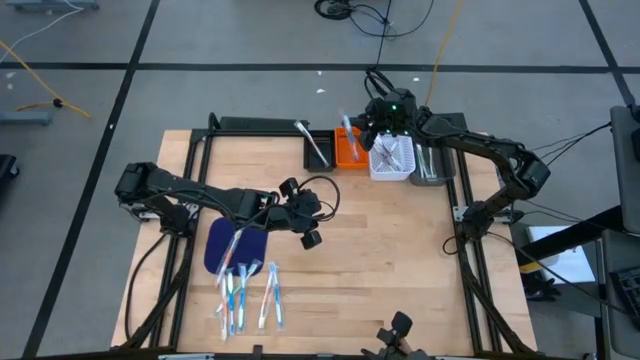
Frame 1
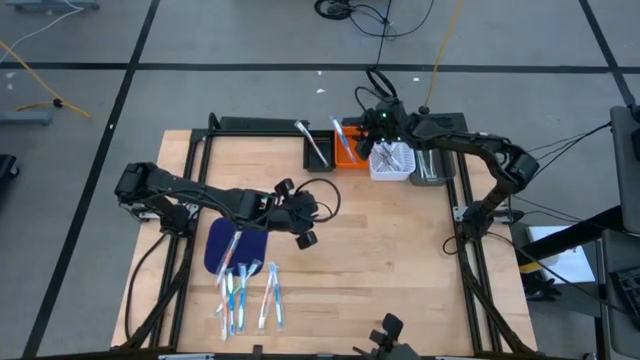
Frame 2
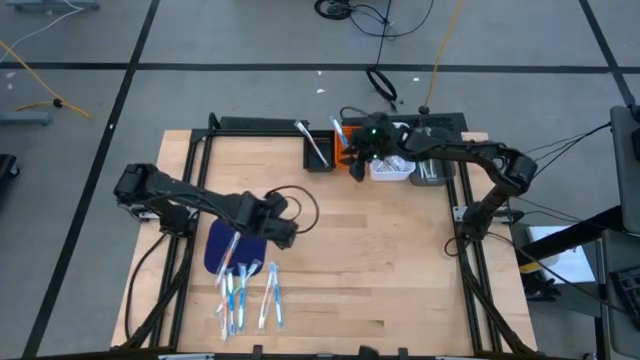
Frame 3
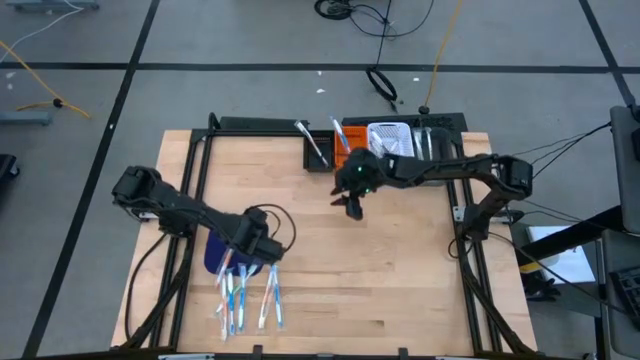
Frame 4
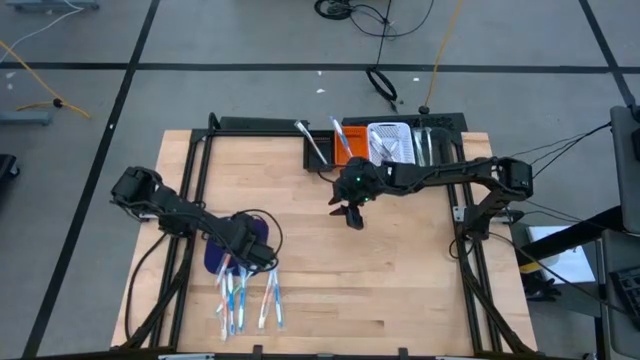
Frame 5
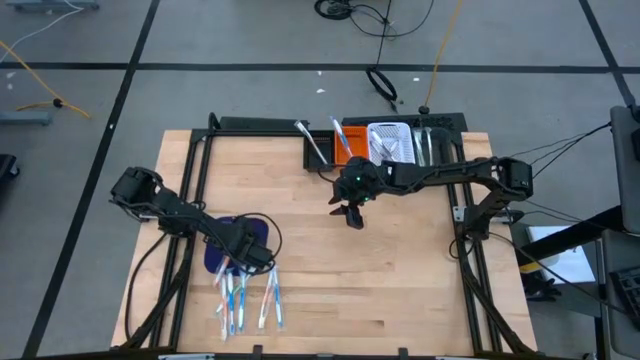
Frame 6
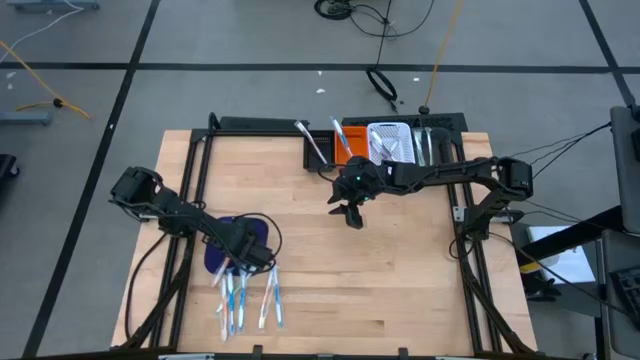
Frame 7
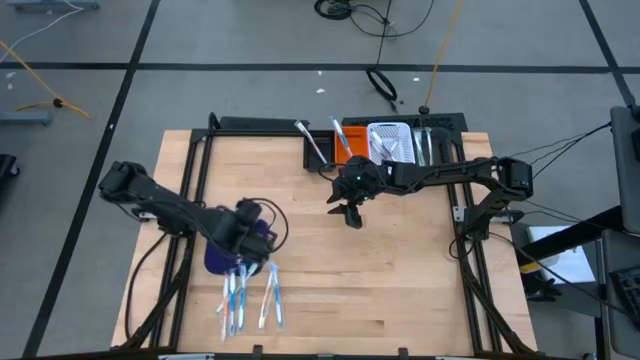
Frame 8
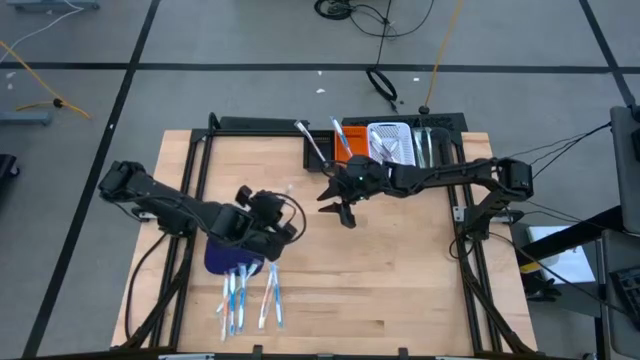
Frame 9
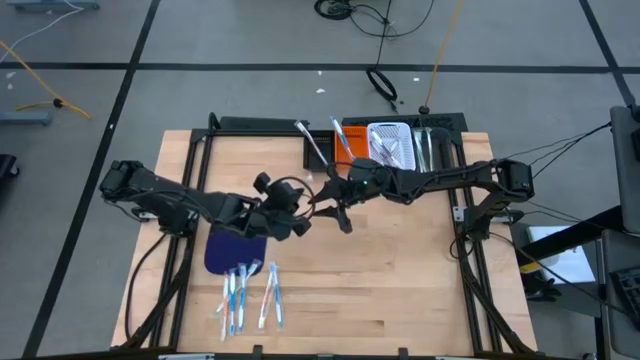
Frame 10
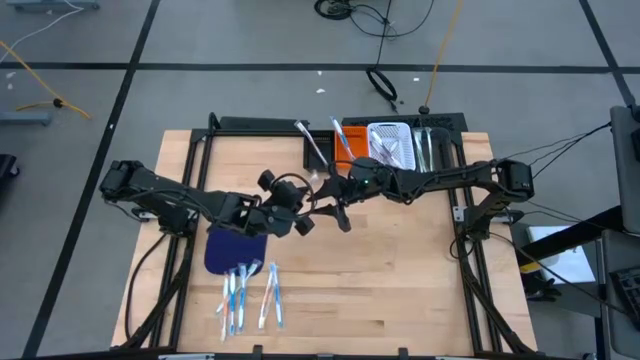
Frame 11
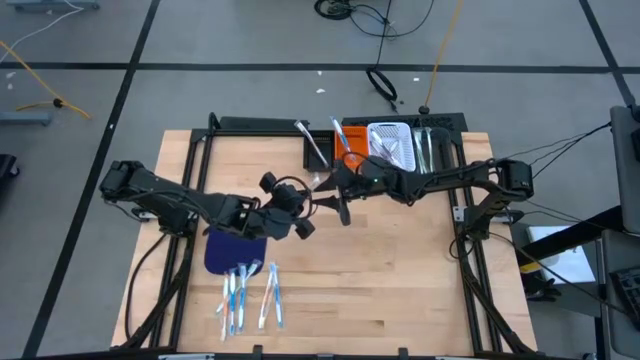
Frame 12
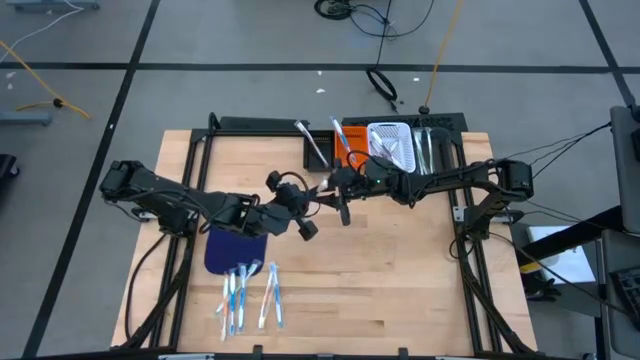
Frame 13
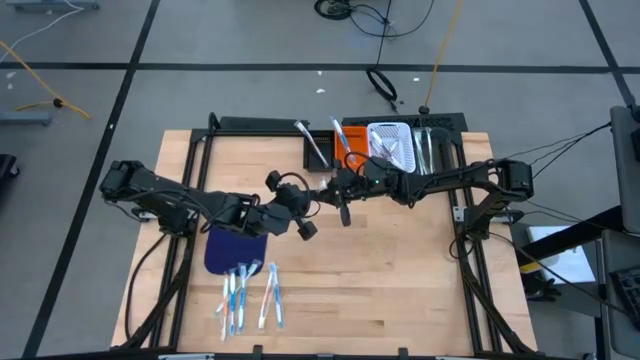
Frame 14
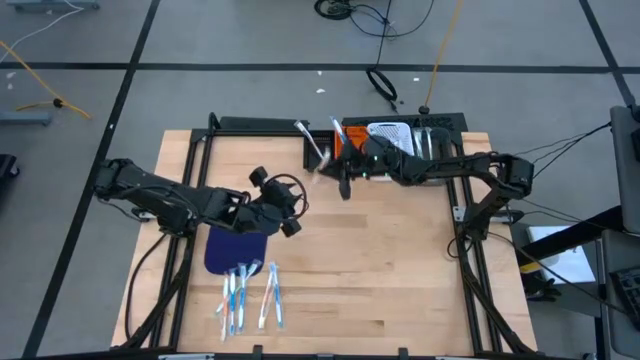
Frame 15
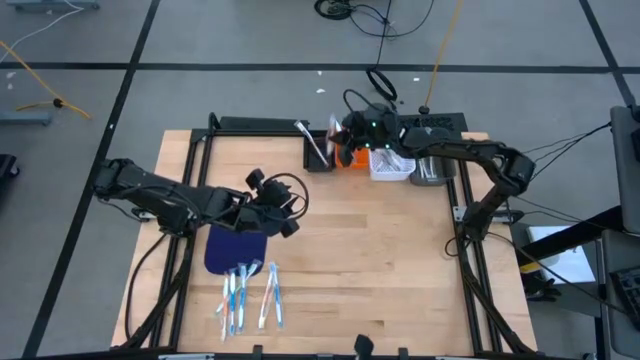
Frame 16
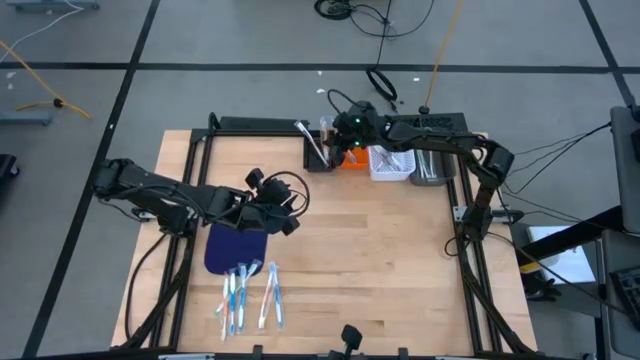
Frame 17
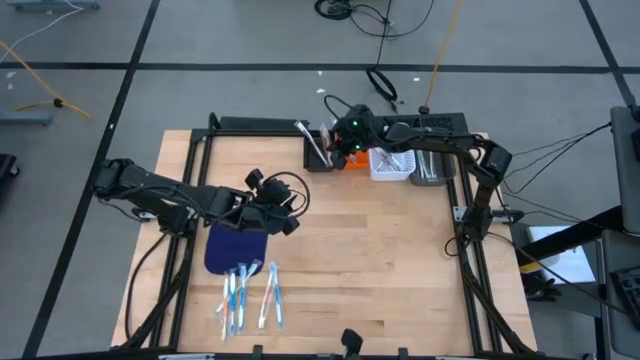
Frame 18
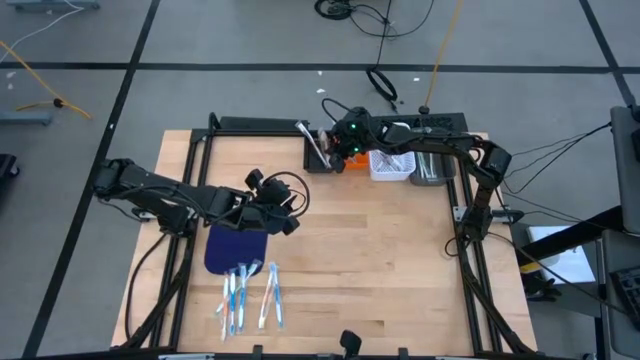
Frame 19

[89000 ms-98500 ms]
Task: Pick & Place Toothbrushes
Put the orange toothbrush into the black bin

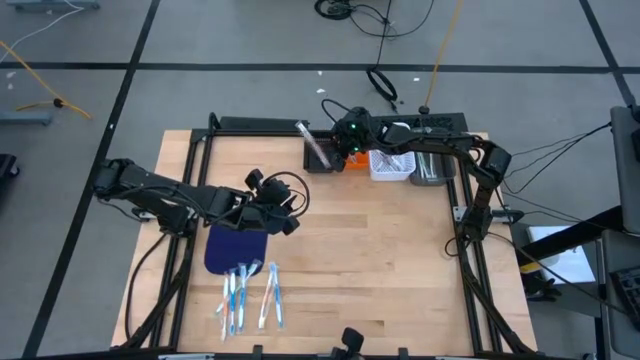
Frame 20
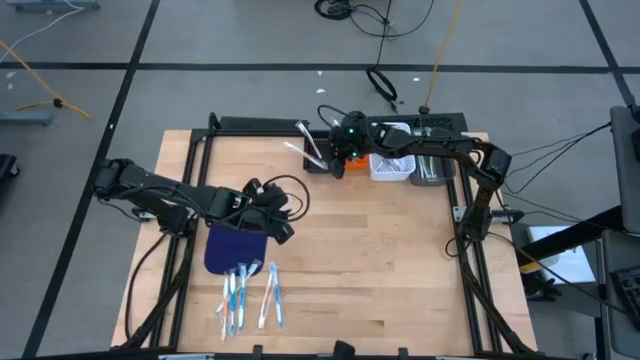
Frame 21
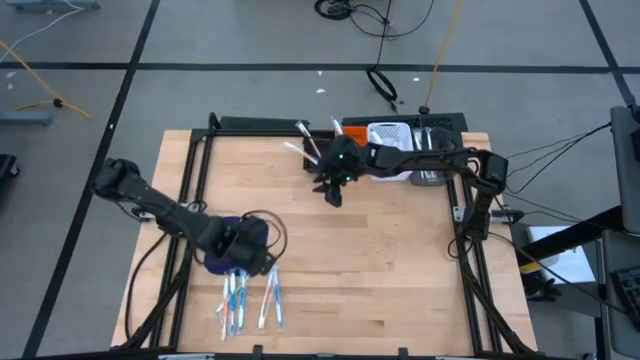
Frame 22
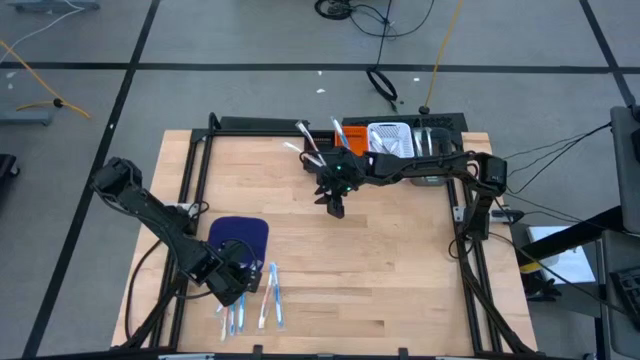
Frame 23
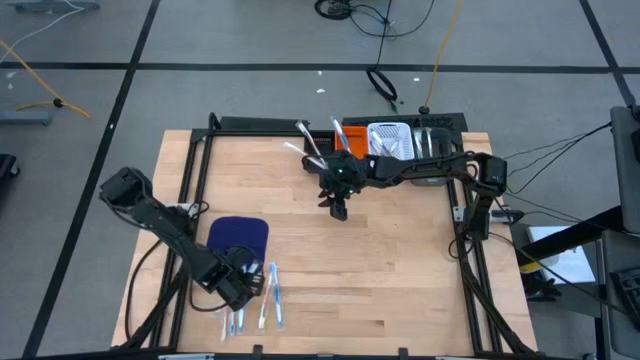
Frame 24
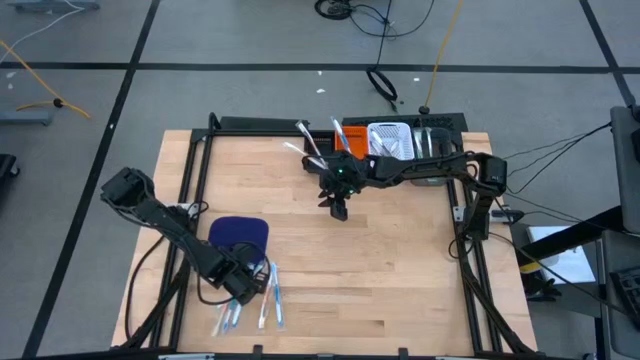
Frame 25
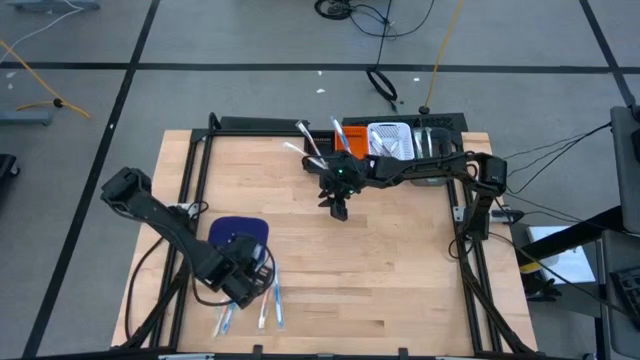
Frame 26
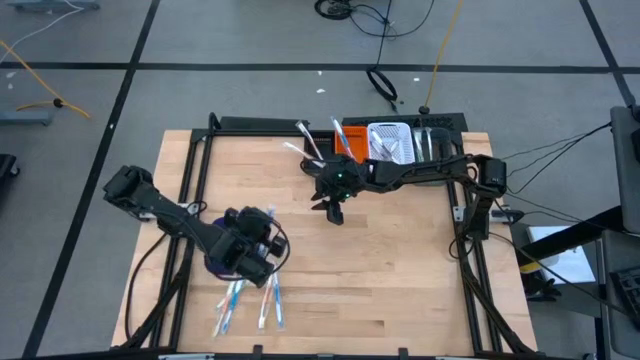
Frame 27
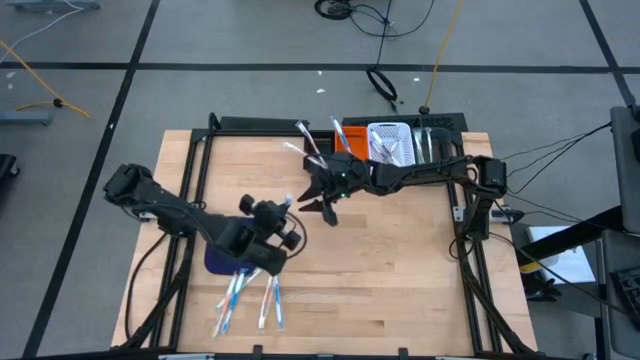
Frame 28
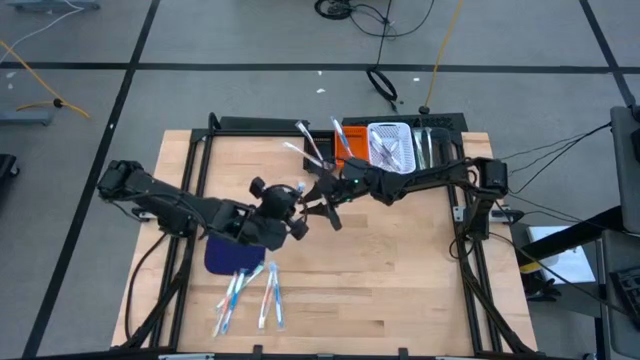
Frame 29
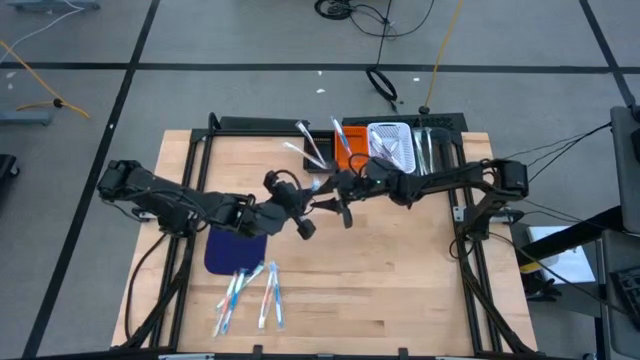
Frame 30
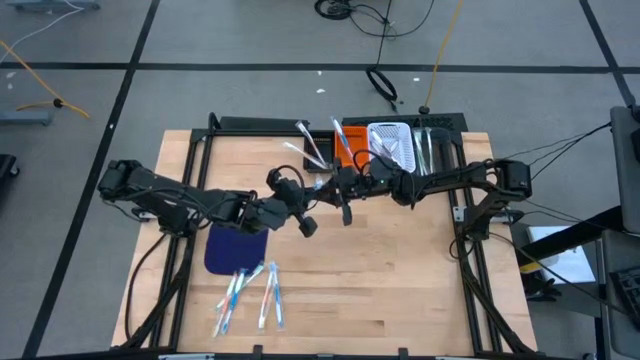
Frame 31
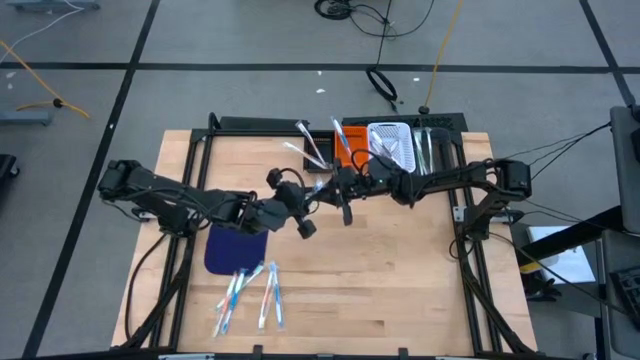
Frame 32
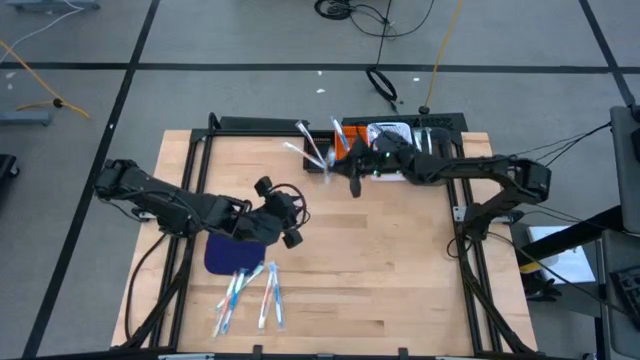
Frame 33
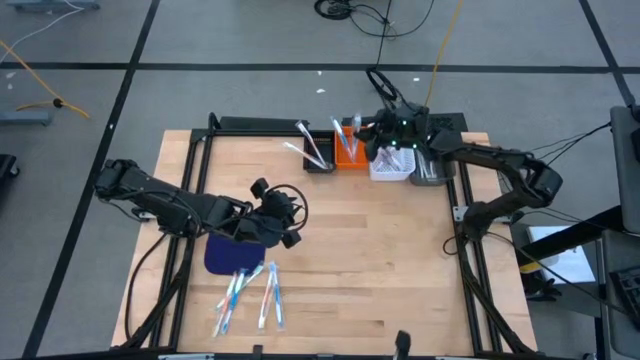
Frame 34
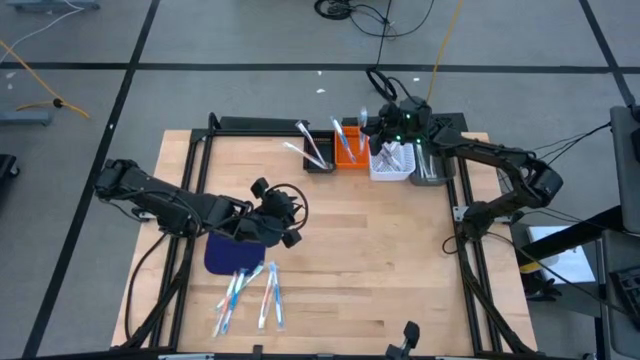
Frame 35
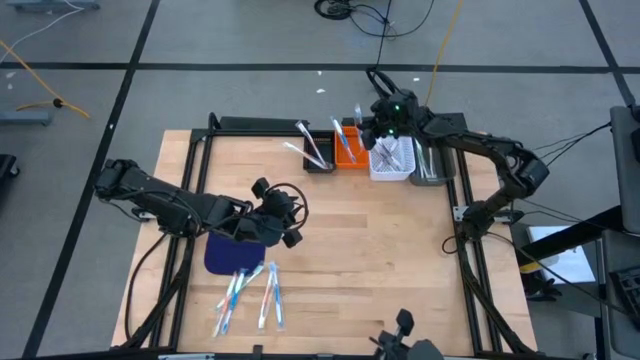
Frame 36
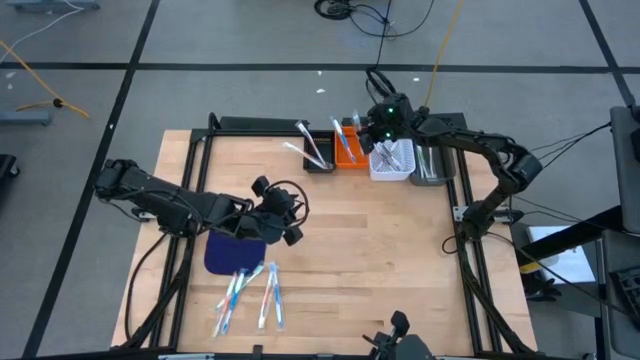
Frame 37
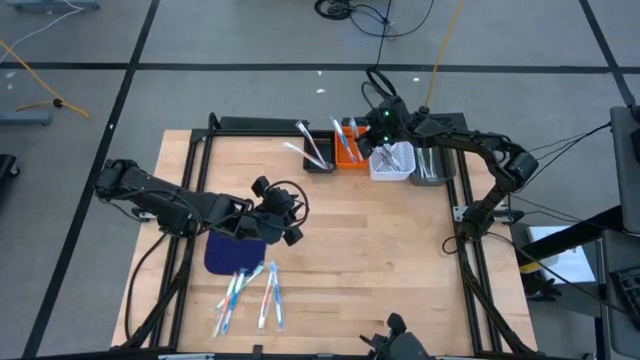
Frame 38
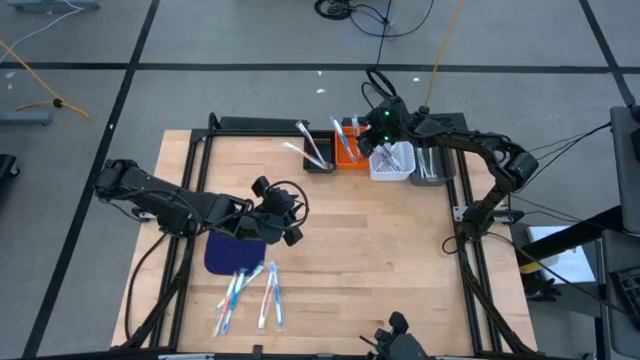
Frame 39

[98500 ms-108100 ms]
Put the blue toothbrush into the orange bin

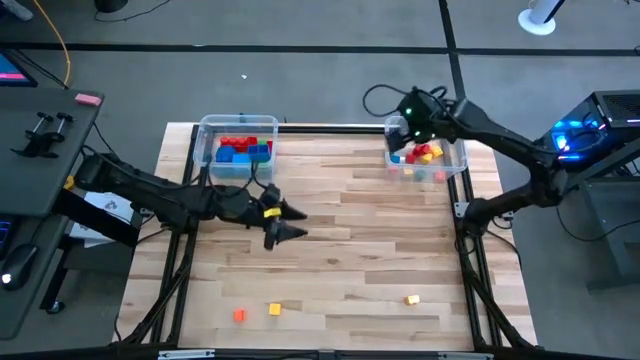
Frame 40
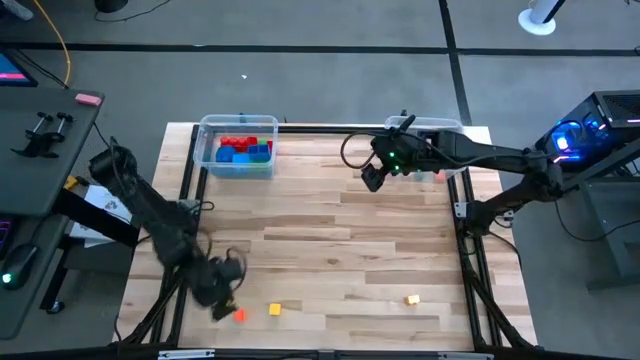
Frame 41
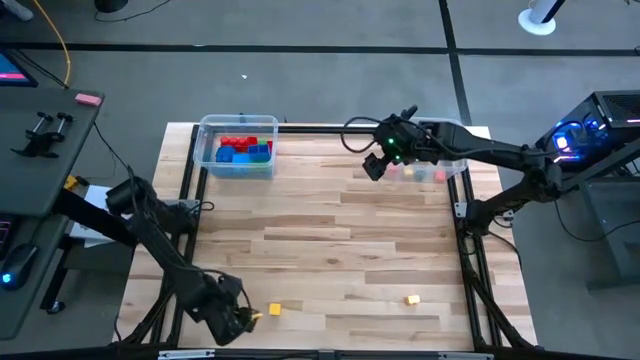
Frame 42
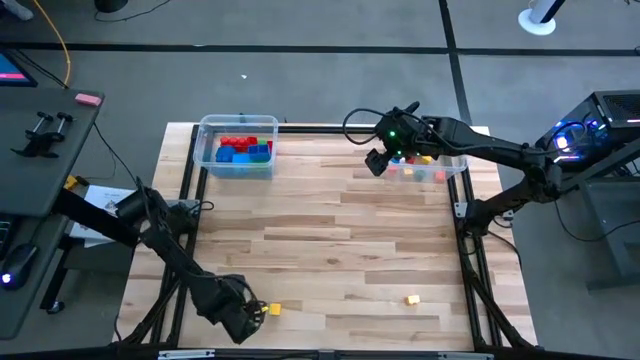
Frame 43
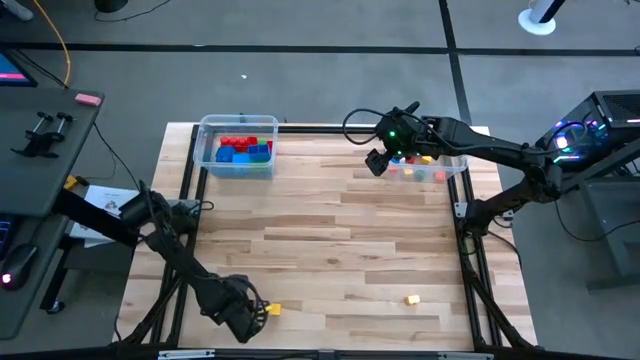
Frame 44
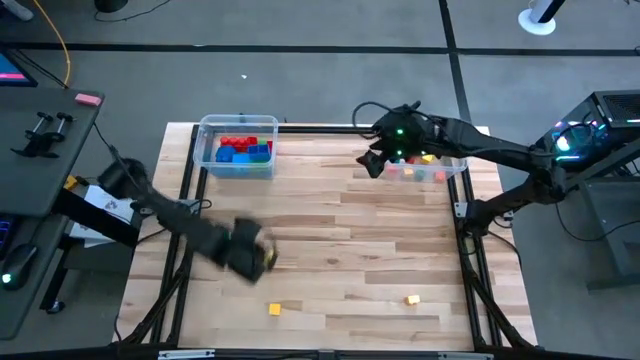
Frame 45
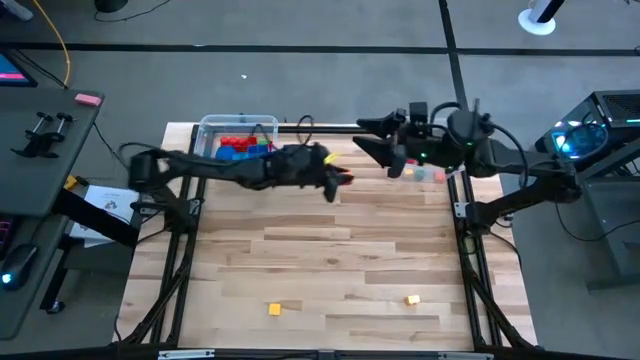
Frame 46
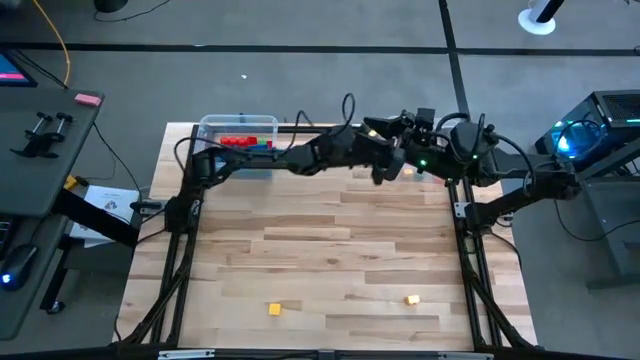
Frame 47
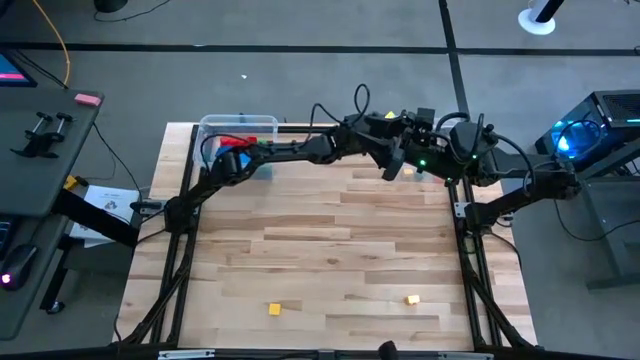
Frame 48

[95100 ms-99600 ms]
Task: Sort blocks by size
Put the small game piece into the right transparent bin
